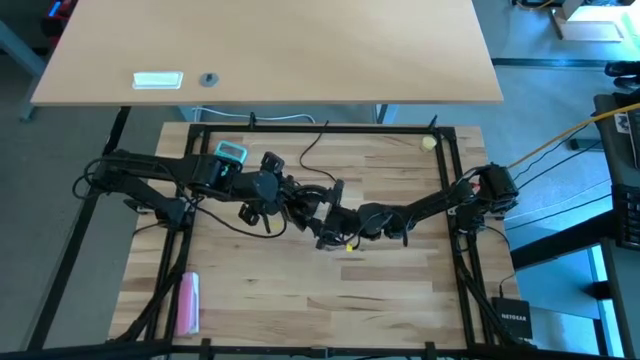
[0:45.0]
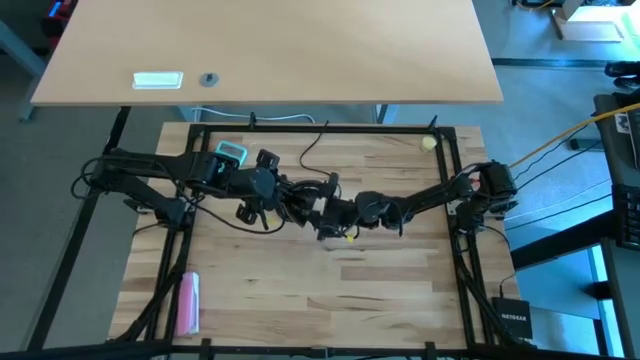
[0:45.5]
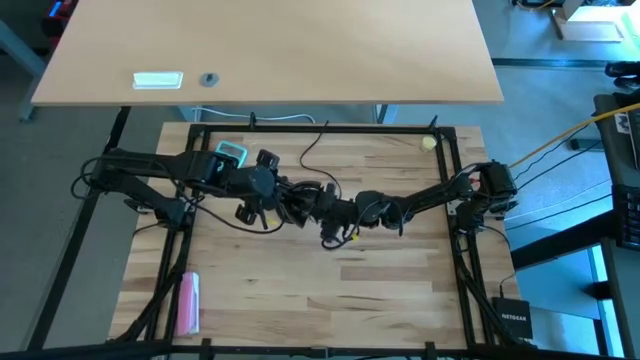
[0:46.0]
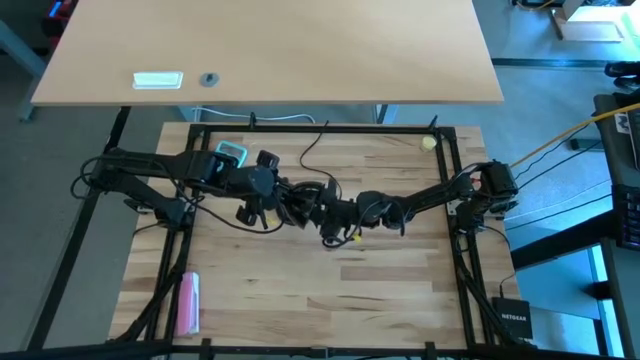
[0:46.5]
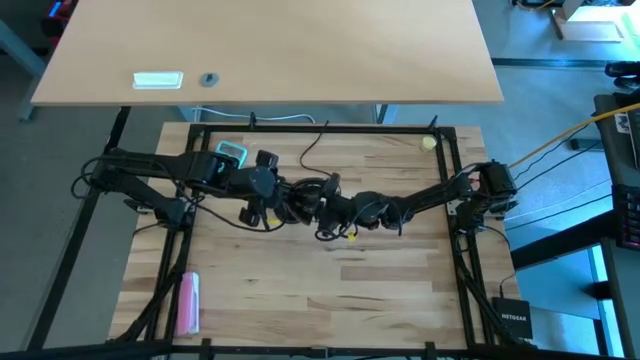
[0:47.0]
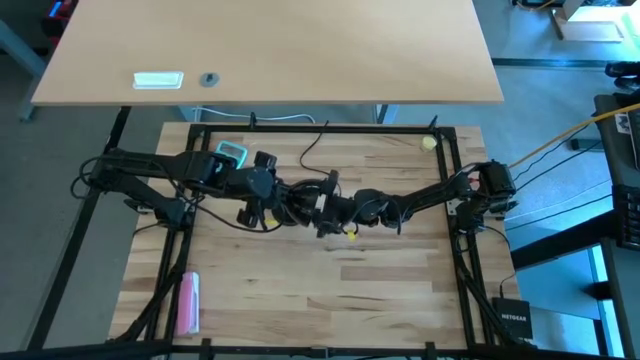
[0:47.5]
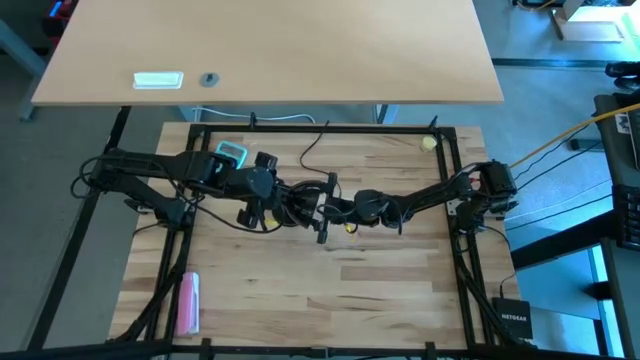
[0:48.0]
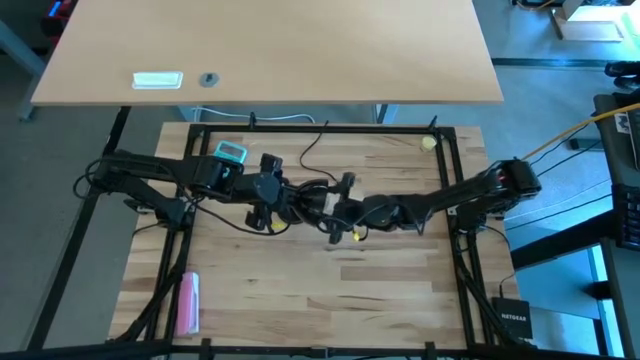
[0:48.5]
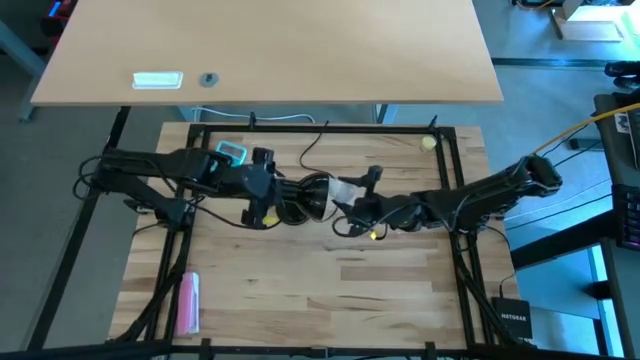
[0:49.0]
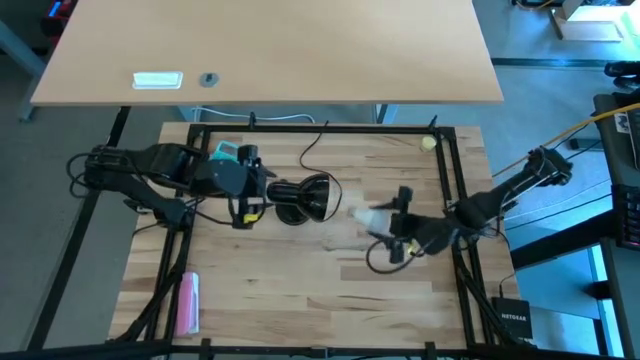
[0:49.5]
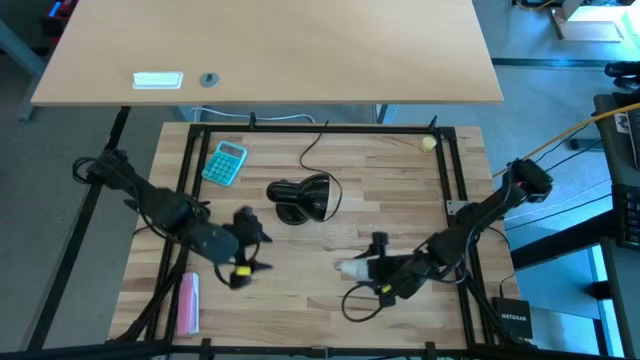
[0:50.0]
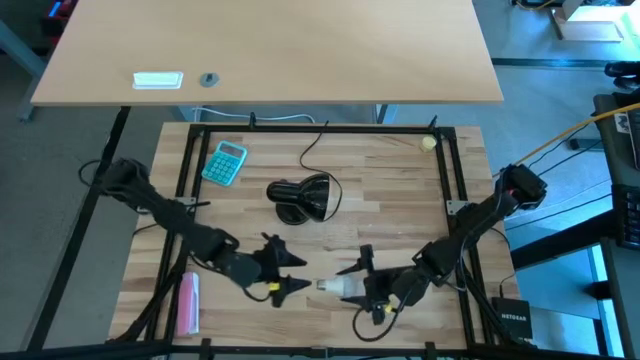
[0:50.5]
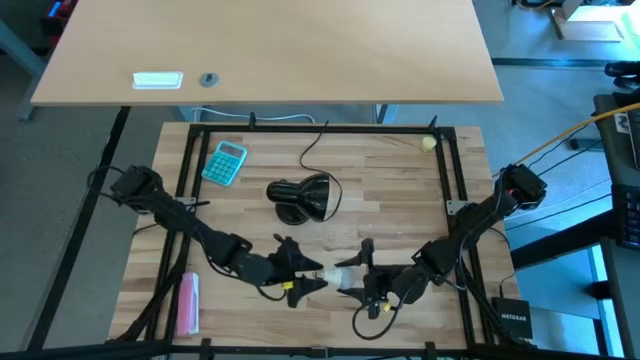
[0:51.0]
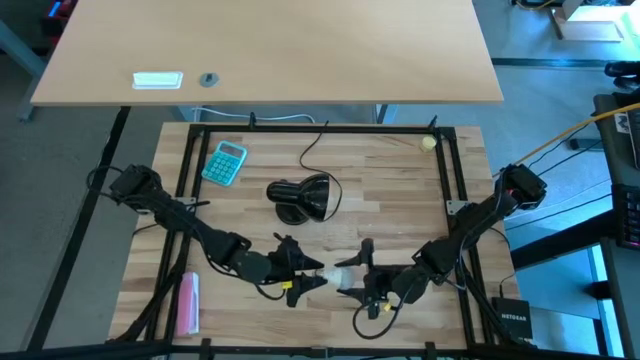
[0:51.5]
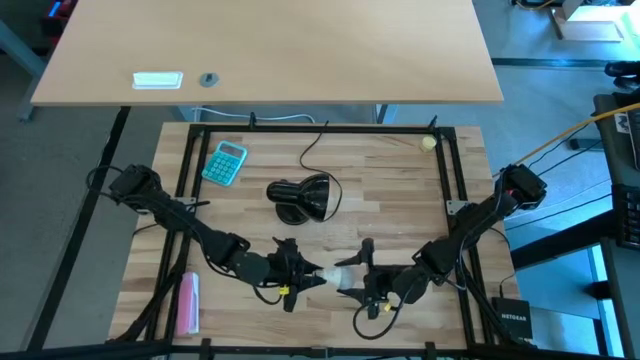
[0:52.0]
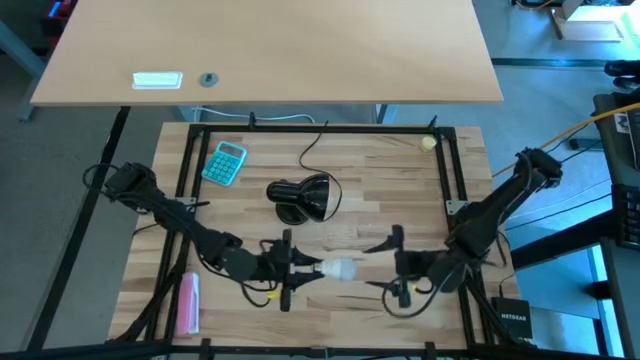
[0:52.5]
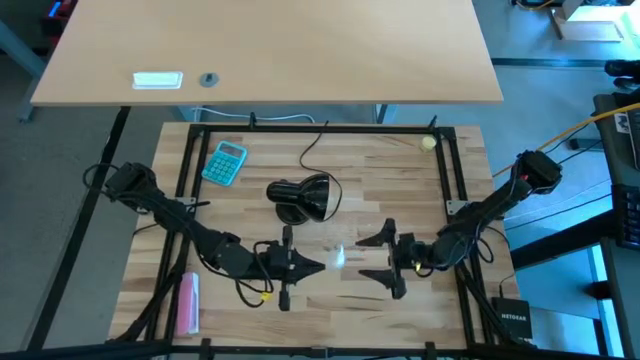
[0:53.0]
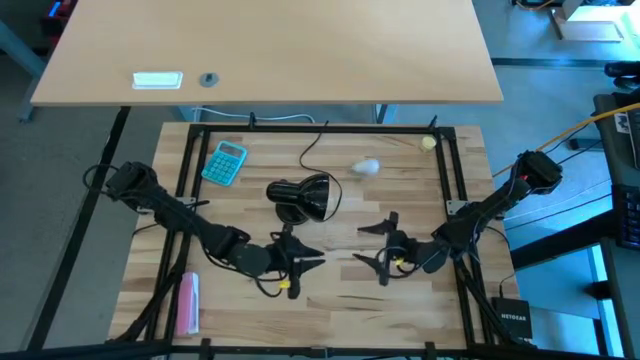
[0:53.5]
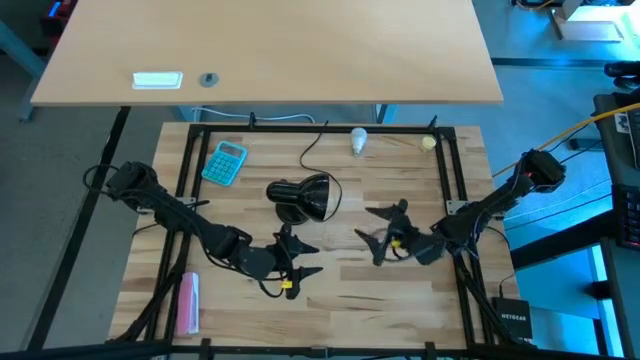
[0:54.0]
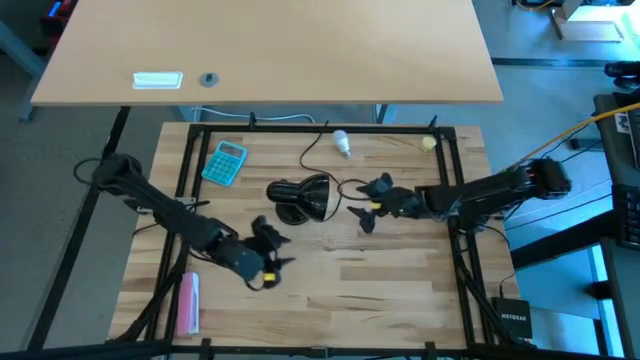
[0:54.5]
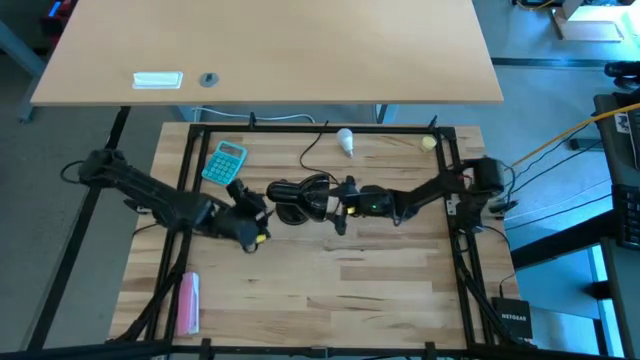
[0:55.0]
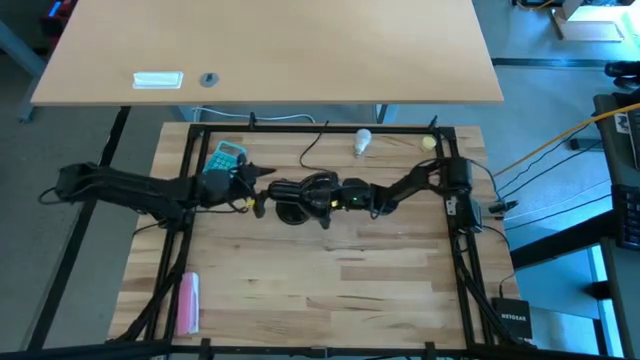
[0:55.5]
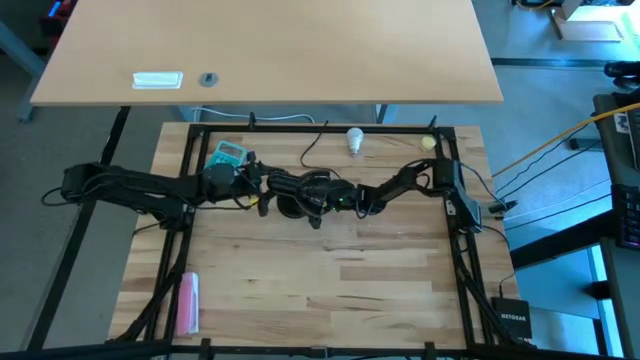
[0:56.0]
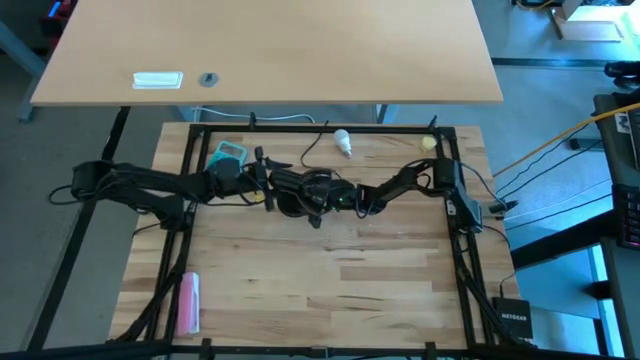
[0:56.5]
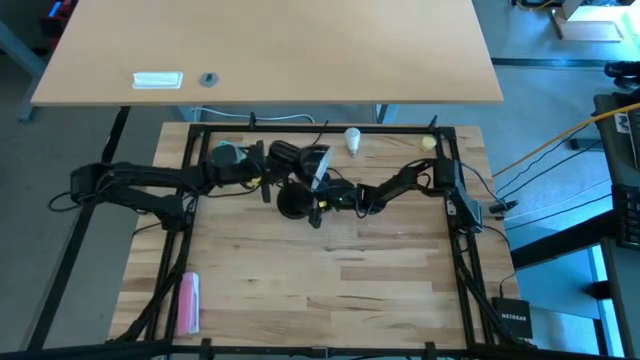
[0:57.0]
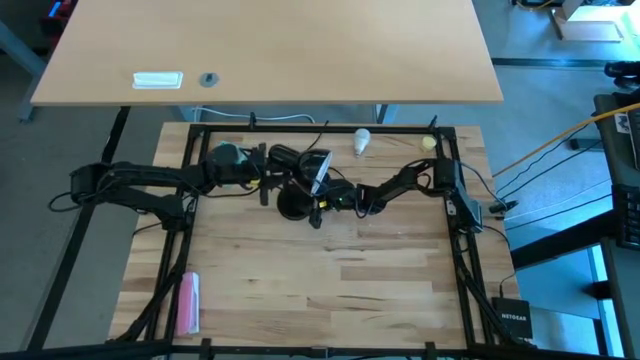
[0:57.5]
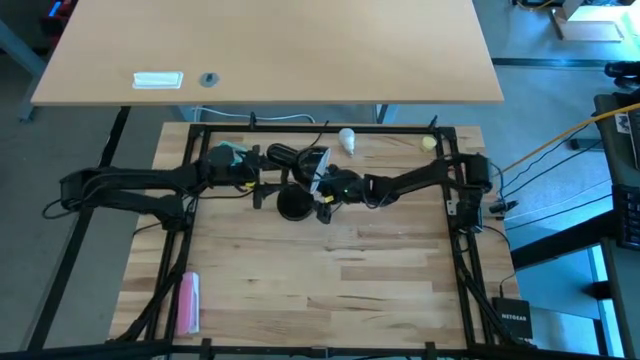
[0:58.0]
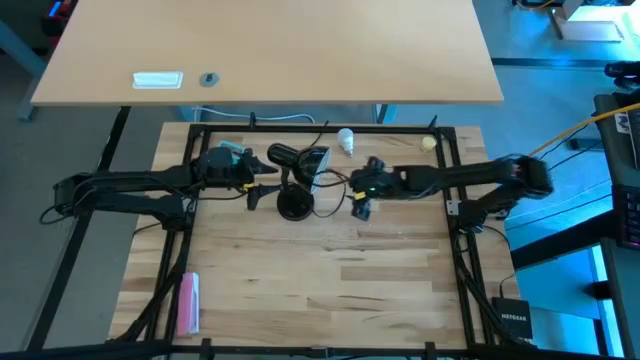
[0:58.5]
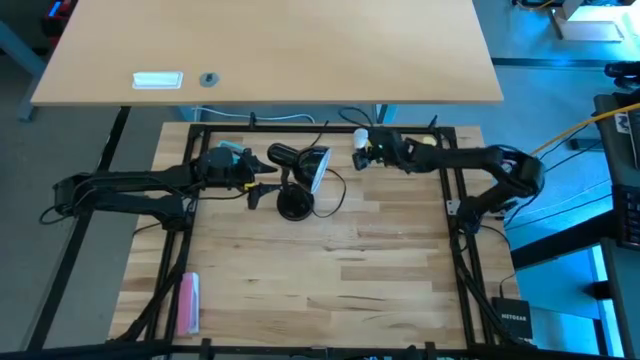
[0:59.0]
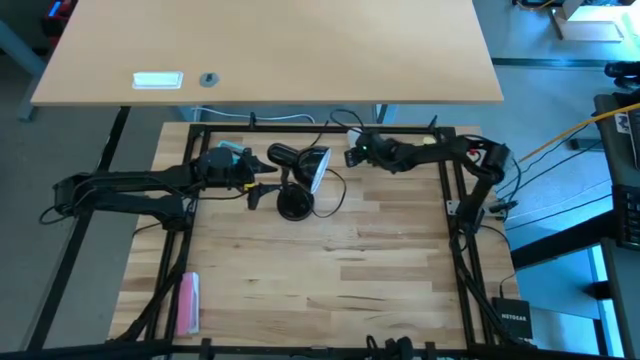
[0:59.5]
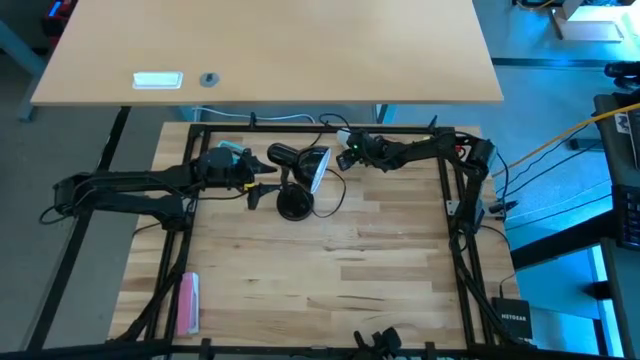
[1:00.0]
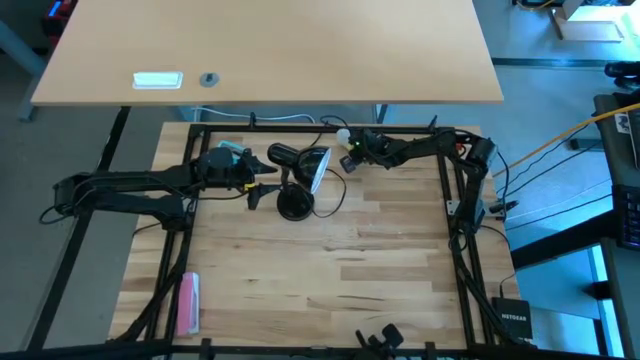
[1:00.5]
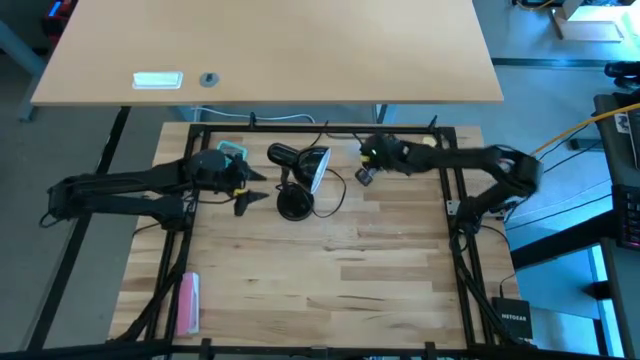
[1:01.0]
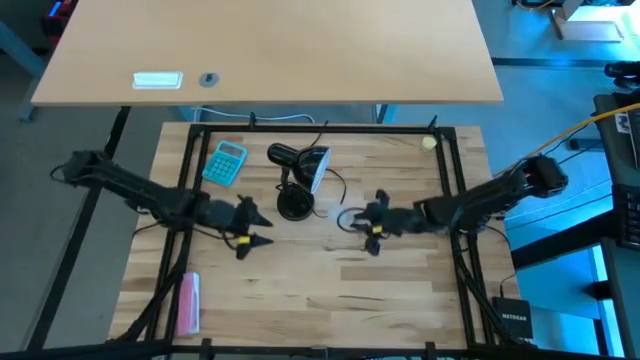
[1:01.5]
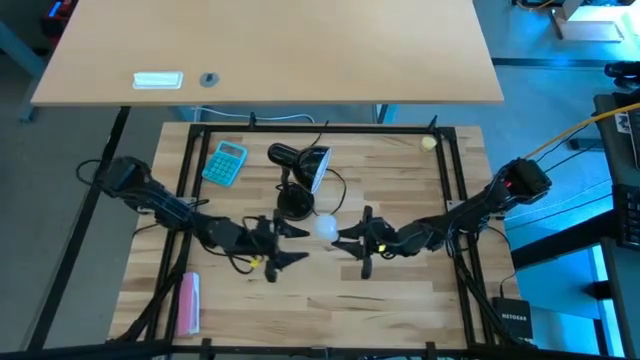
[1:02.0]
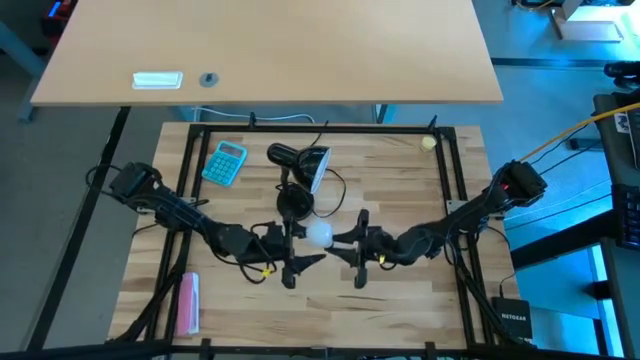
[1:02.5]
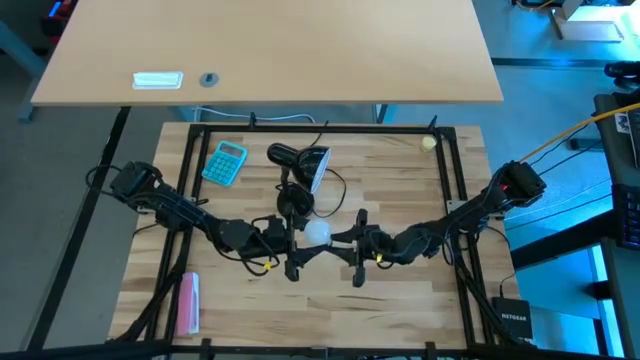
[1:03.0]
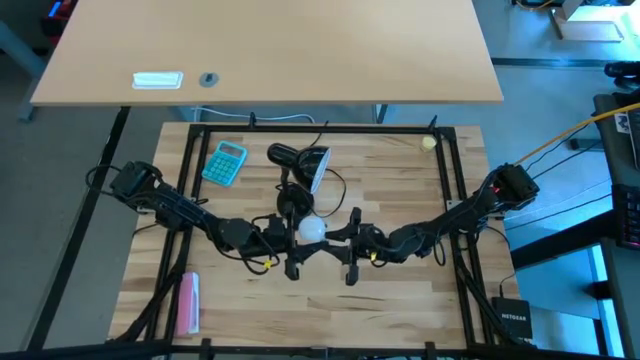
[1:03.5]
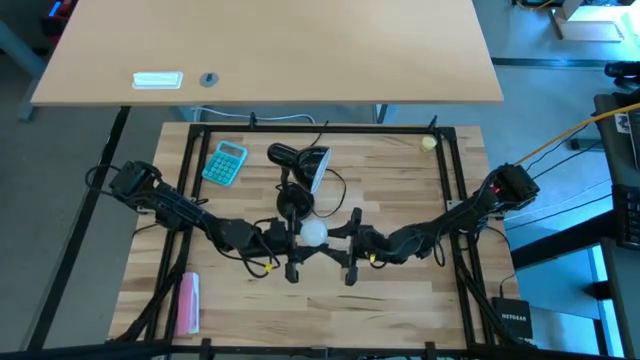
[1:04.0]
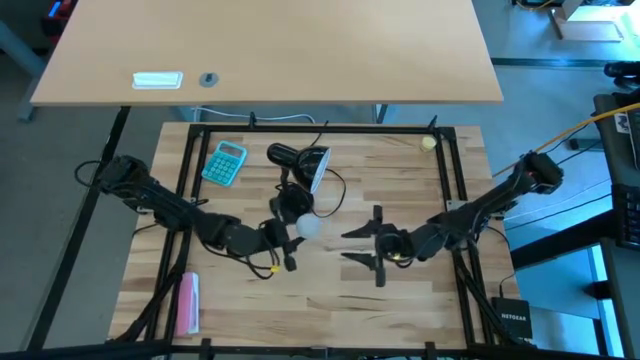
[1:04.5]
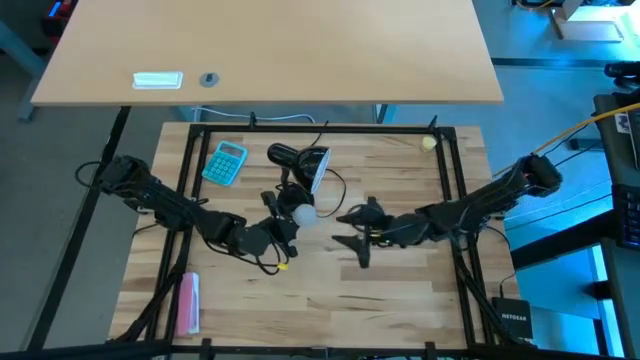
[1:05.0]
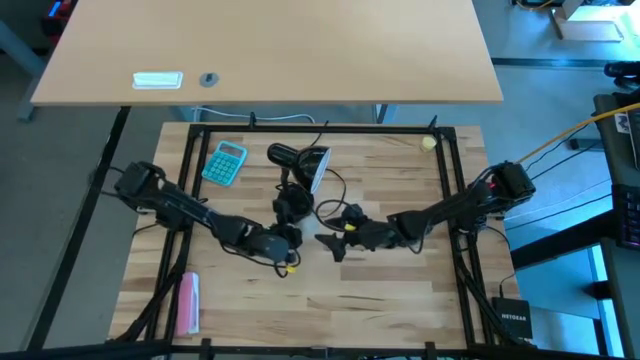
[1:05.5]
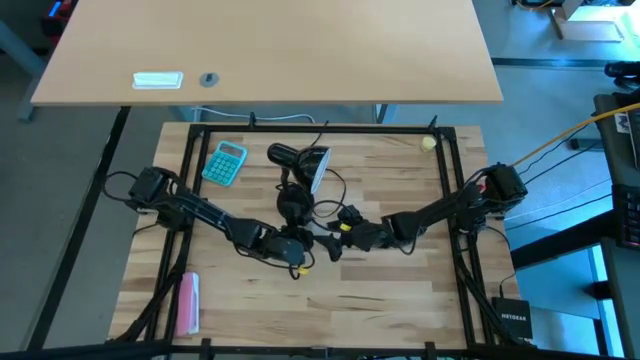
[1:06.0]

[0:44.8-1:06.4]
Task: Screw lightbulb
Insert the lightbulb into the black lamp
